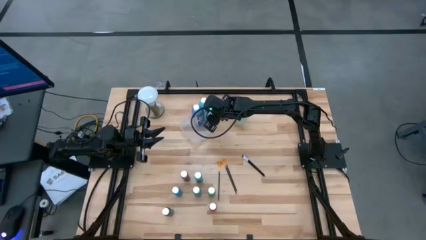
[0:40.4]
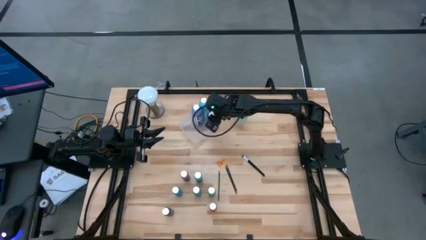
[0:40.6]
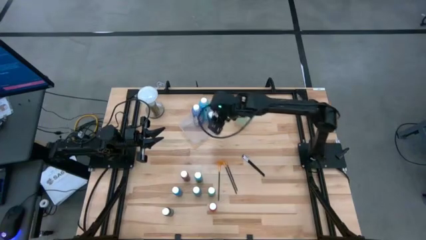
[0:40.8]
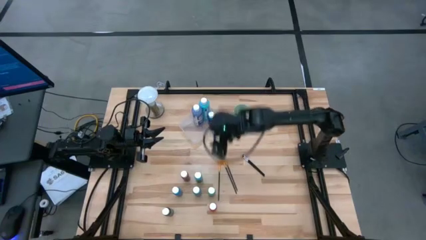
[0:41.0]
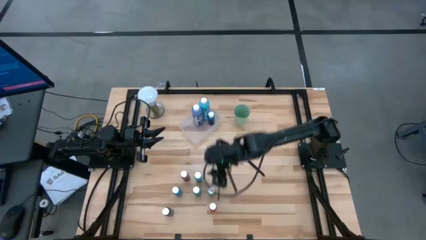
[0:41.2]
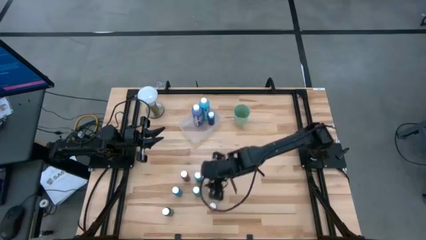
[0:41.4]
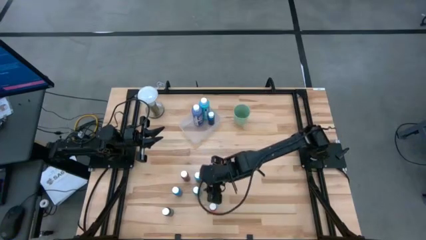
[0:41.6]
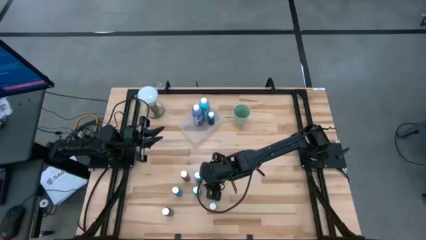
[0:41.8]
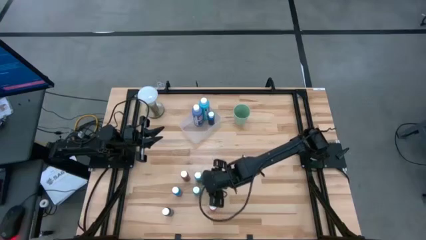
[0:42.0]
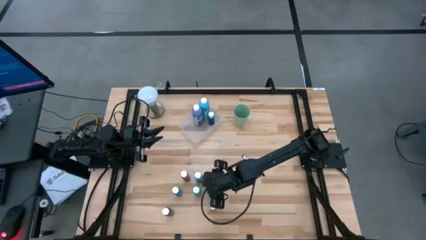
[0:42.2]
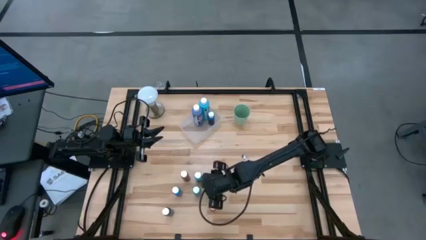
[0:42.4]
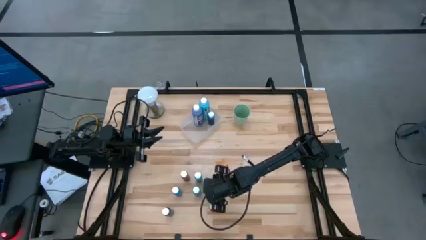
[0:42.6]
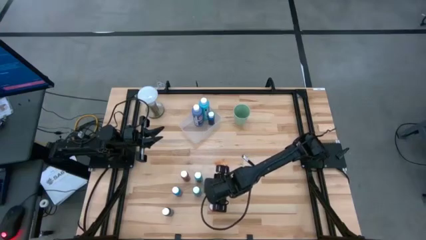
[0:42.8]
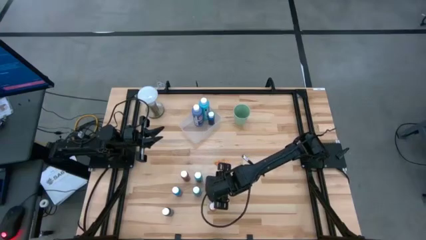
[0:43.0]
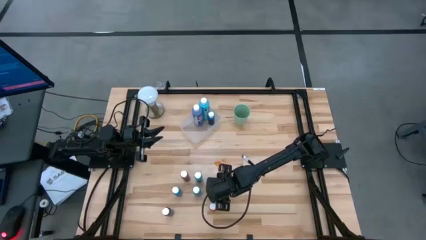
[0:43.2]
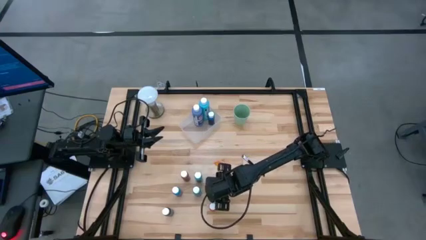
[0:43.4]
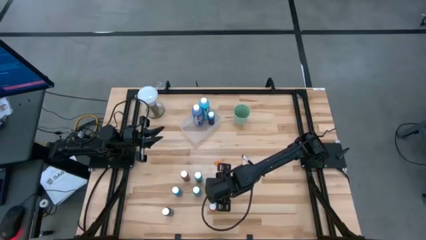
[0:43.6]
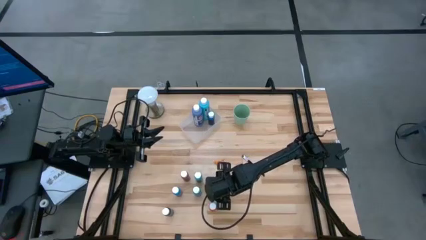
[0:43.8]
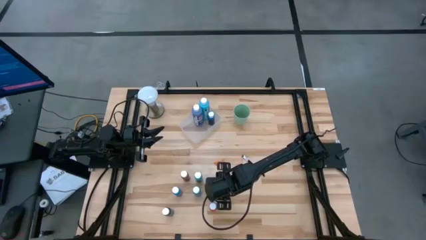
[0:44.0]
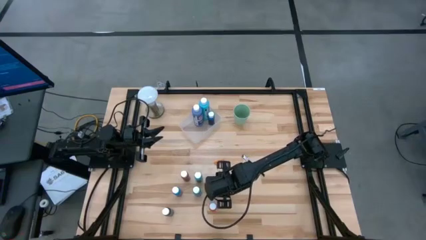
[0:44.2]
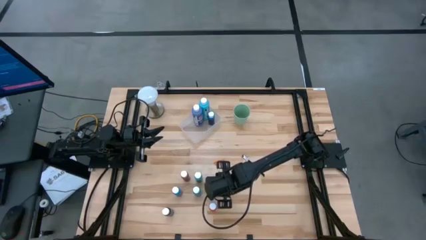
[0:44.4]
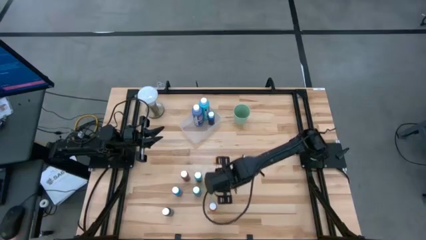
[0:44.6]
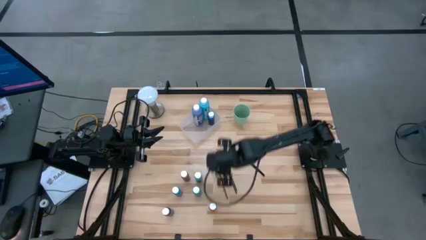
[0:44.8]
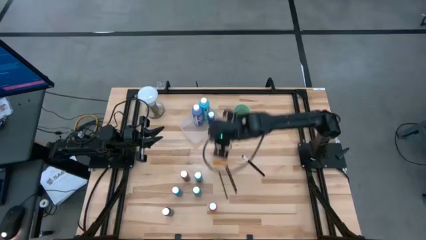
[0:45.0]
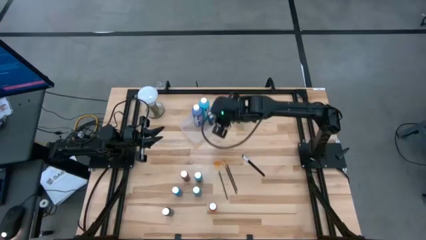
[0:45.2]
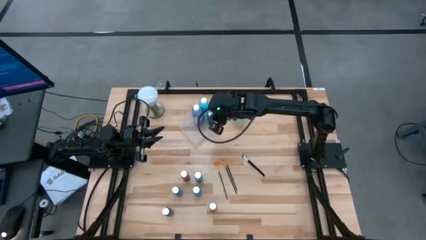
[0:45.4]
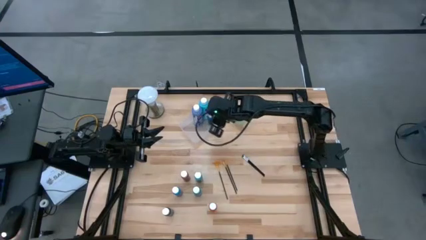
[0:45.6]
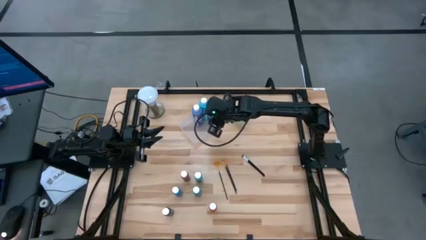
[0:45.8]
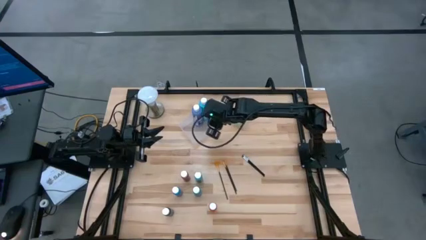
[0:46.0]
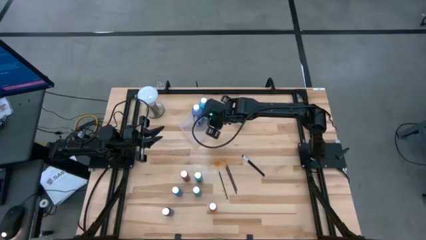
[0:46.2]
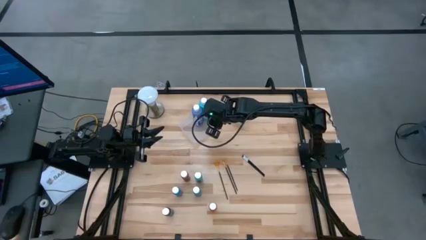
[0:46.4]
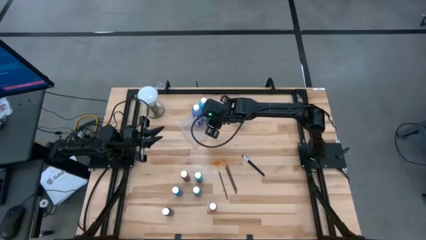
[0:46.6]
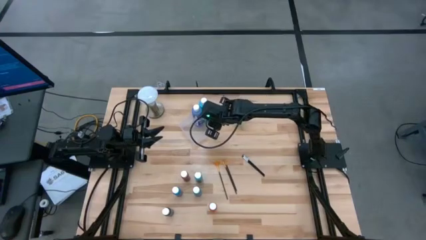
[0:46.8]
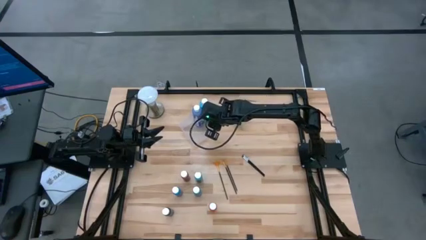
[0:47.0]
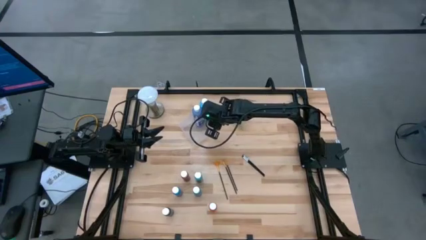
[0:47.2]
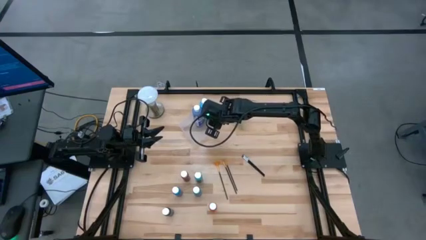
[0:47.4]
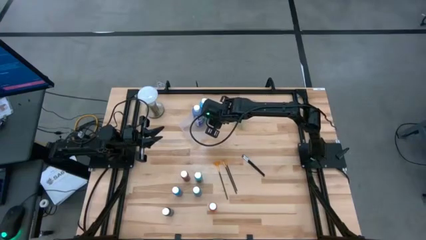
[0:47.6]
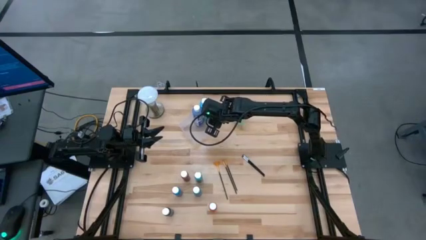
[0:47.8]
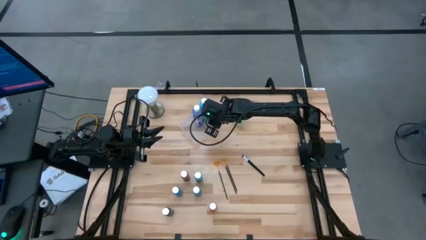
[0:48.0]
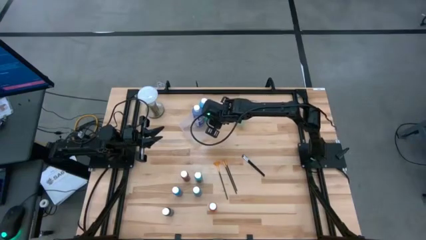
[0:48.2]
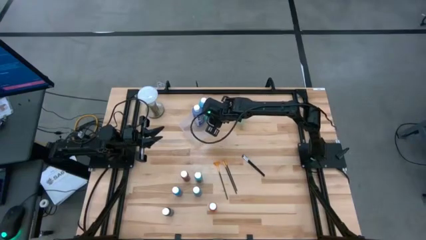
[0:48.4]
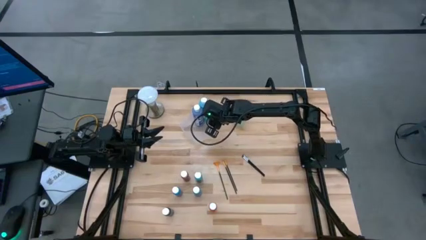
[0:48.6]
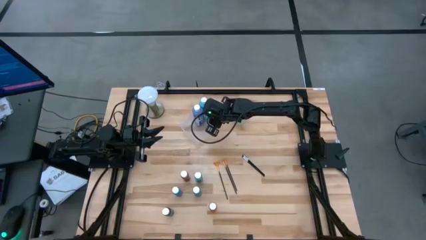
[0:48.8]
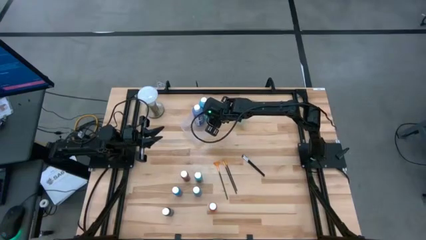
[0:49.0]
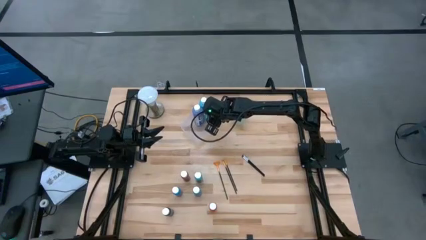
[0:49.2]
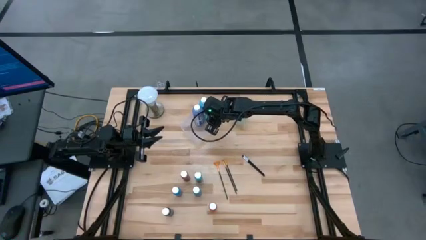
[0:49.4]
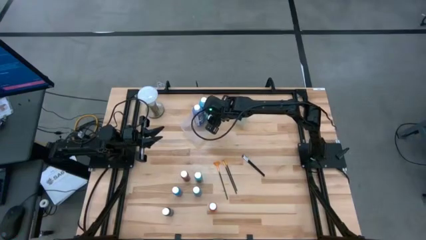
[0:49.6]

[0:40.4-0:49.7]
Task: Pick & Place Paint Supplies
Put the right small green paint bottle into the transparent bin

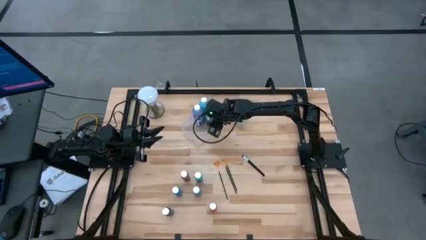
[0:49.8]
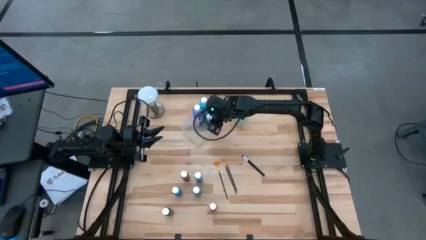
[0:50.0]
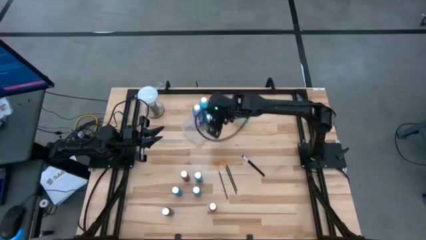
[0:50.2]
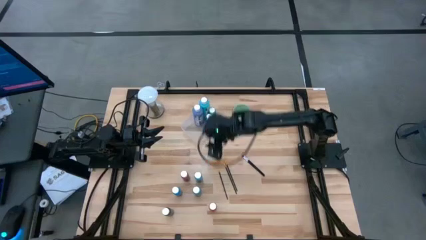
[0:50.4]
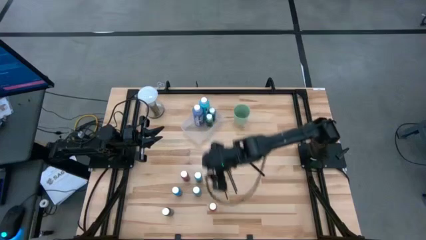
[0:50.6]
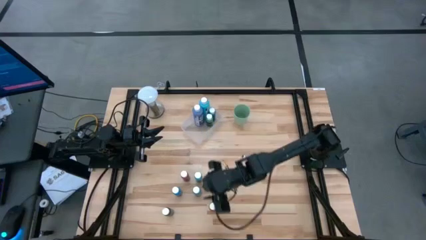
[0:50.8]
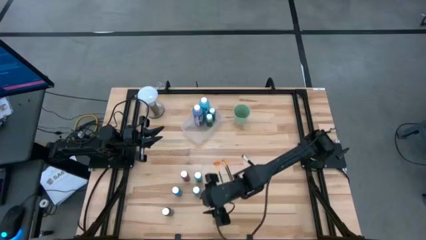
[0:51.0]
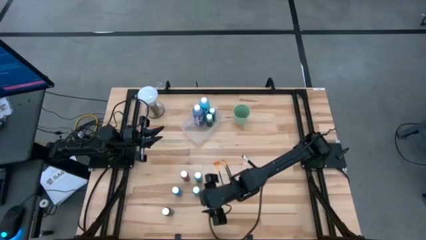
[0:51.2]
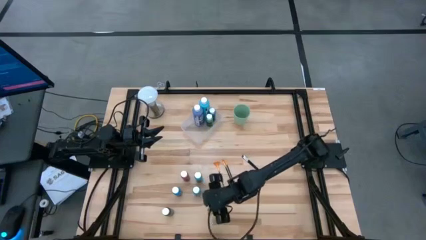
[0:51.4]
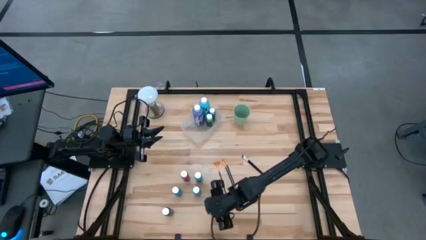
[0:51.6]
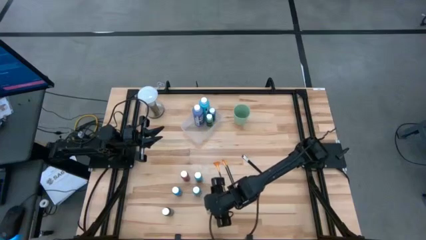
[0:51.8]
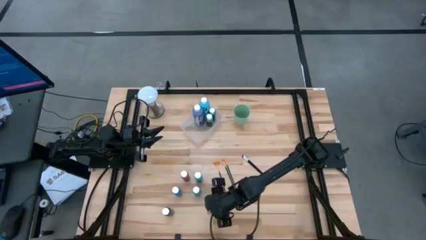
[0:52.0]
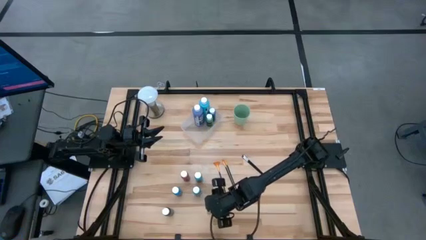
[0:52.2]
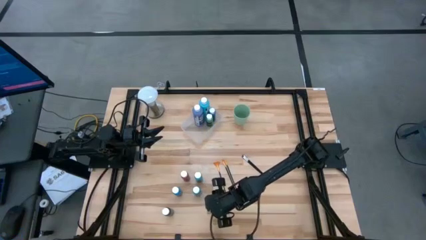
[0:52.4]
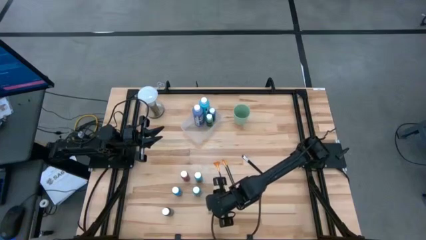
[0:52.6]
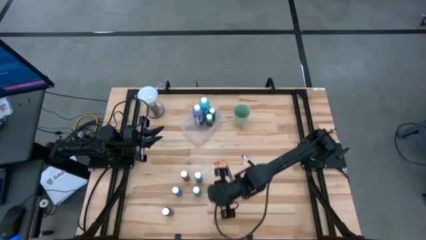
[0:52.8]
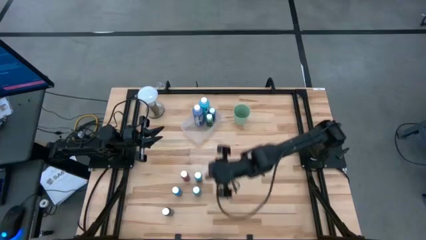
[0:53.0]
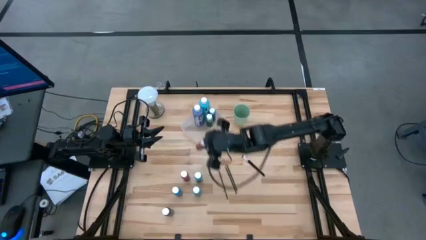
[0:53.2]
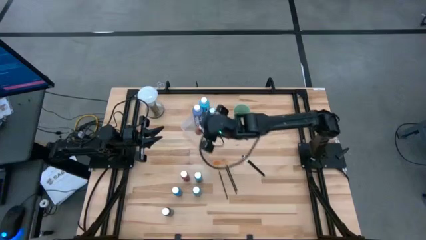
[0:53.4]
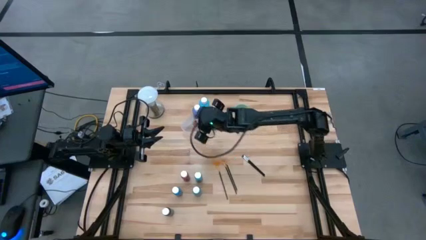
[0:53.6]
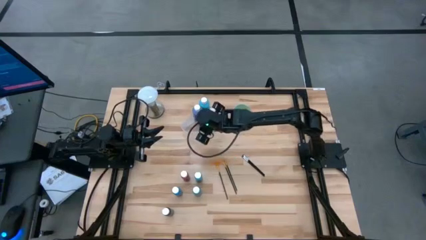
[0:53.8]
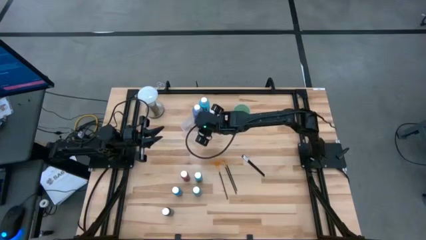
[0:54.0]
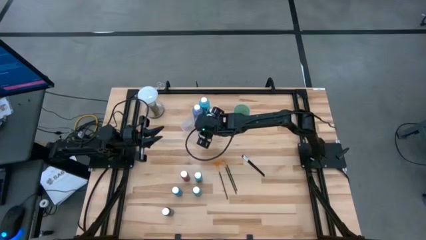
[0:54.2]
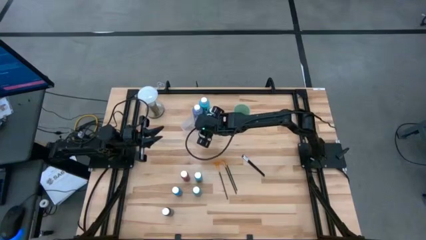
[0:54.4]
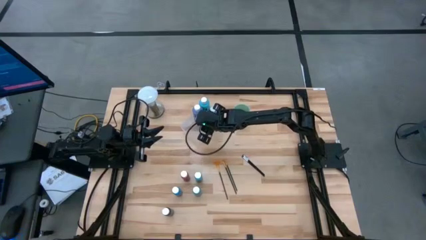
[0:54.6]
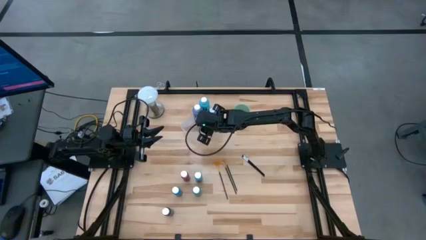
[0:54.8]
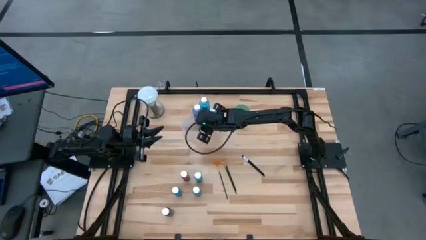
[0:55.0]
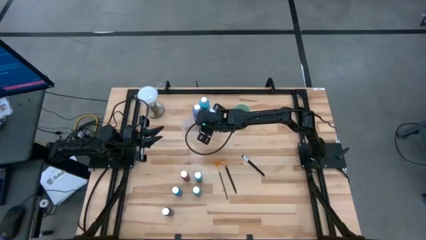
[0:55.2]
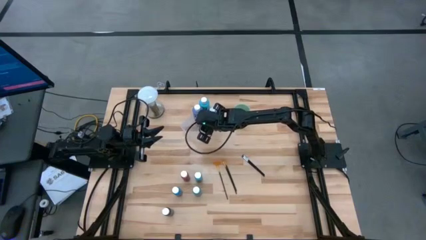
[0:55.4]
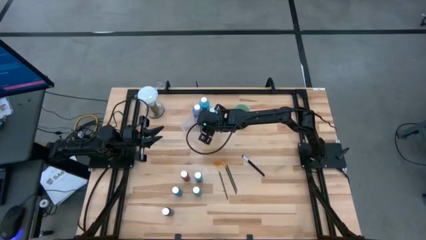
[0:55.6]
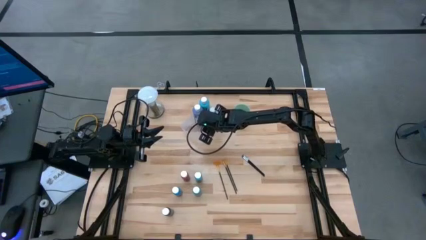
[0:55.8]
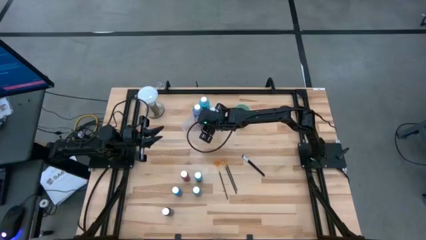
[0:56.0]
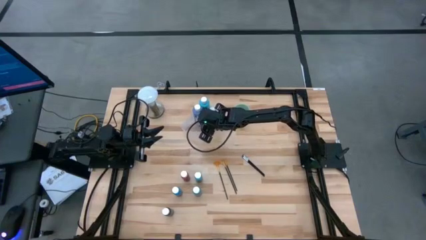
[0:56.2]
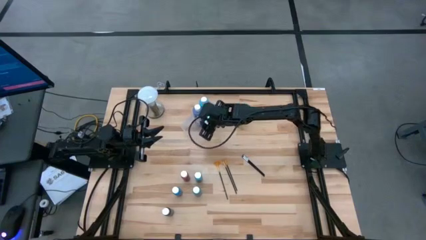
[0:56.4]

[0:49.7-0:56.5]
Put the bottom small red paint bottle into the transparent bin

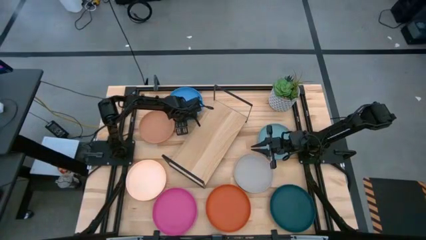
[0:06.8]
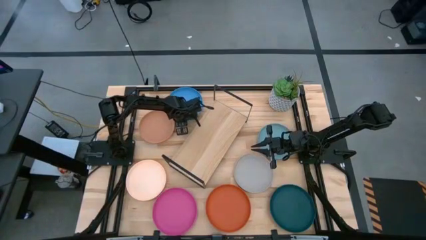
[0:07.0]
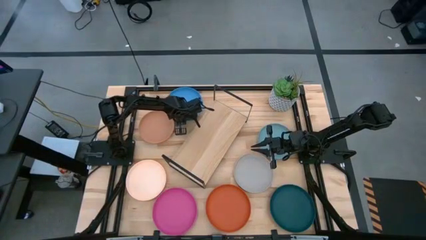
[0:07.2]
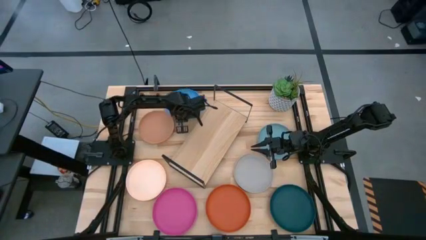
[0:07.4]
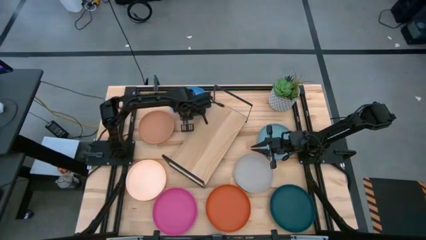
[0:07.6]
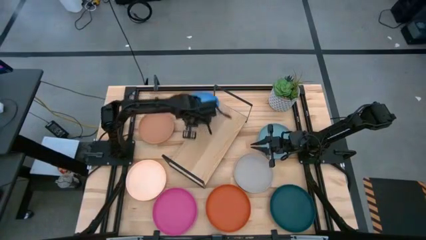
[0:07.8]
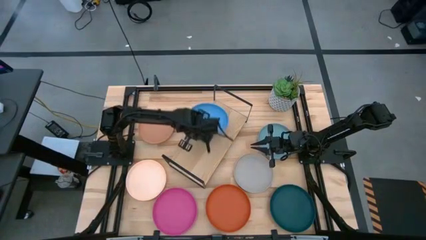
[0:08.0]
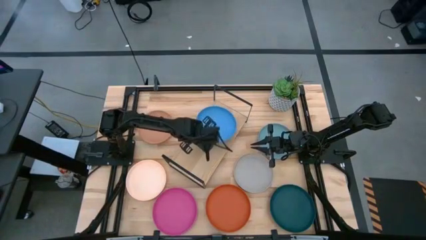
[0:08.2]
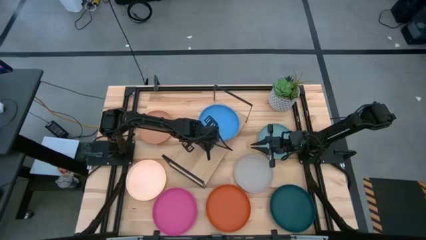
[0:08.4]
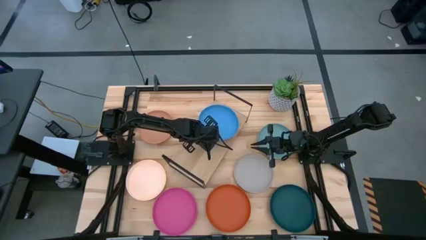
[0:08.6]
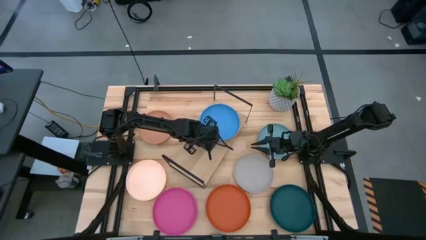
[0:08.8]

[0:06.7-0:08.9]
Task: Place and stack plates onto a shelf
Put the blue plate on the shelf
